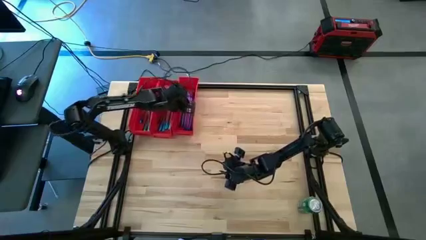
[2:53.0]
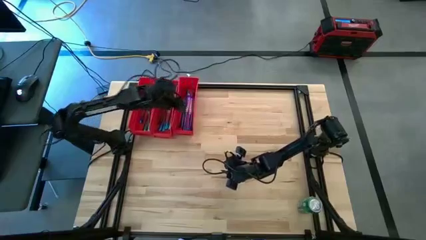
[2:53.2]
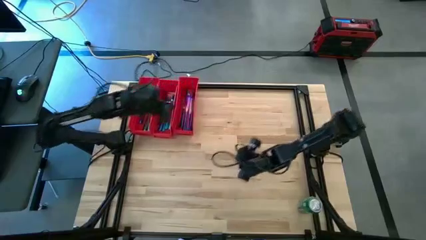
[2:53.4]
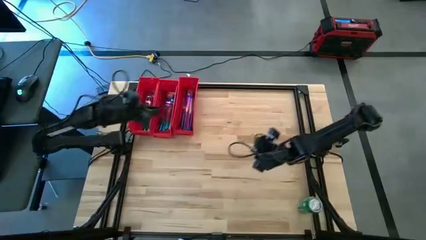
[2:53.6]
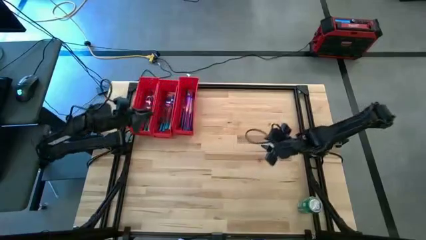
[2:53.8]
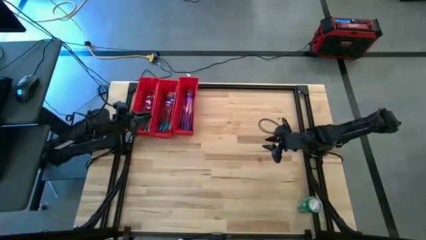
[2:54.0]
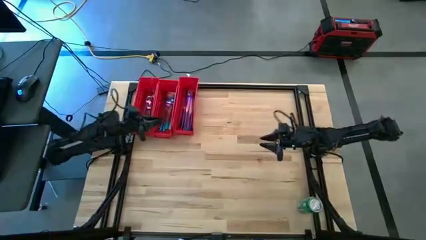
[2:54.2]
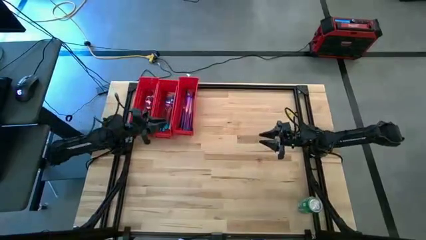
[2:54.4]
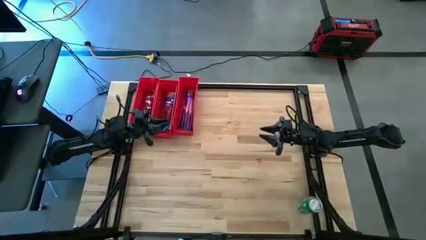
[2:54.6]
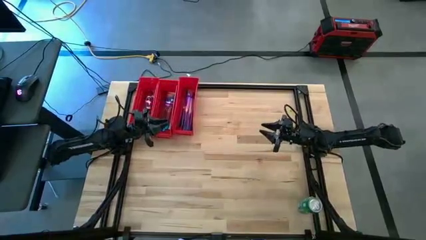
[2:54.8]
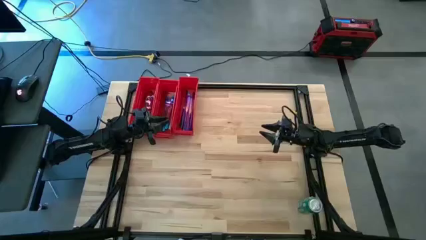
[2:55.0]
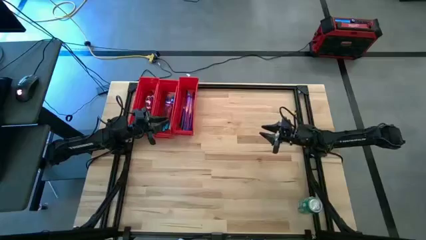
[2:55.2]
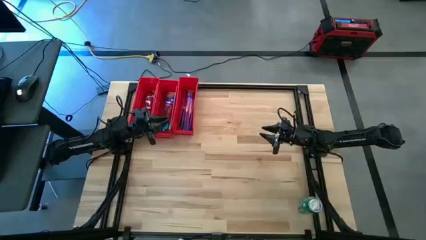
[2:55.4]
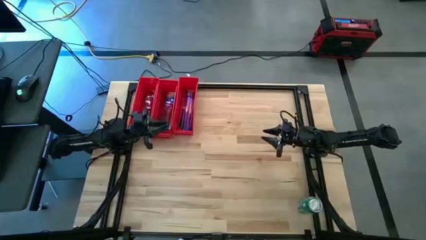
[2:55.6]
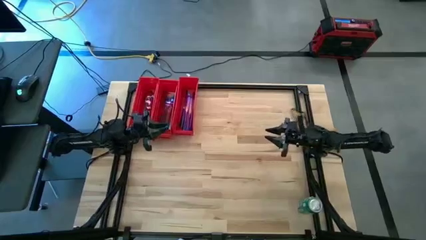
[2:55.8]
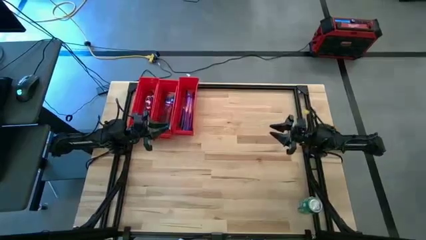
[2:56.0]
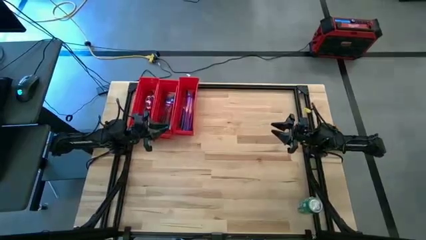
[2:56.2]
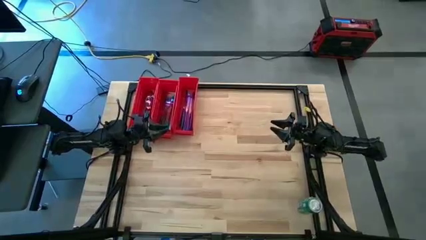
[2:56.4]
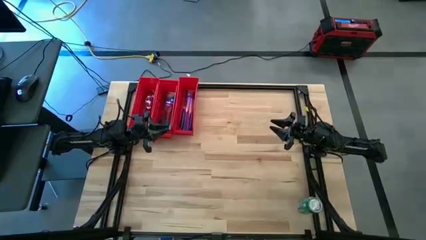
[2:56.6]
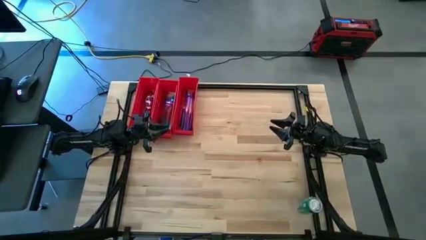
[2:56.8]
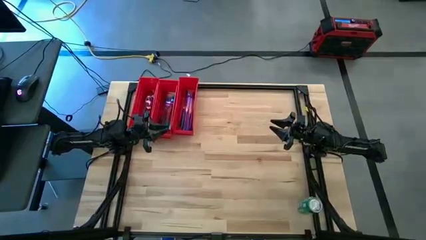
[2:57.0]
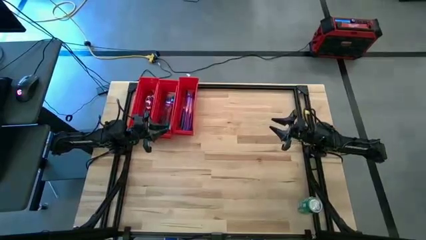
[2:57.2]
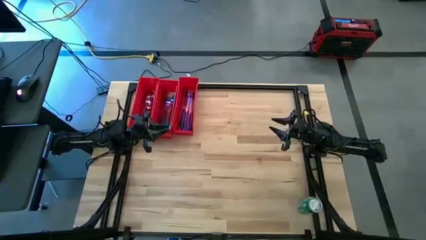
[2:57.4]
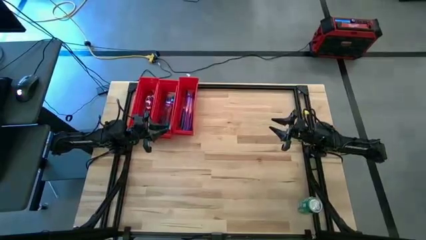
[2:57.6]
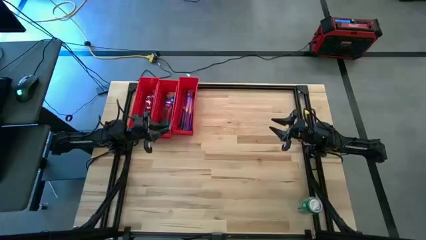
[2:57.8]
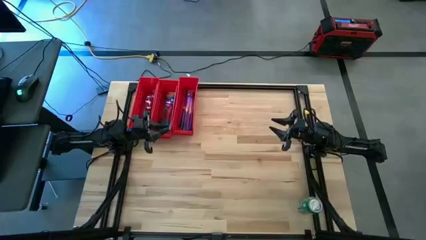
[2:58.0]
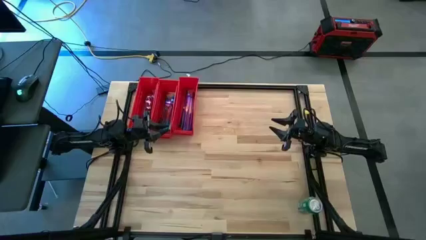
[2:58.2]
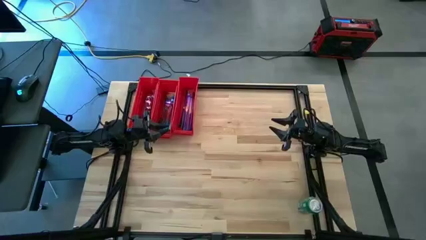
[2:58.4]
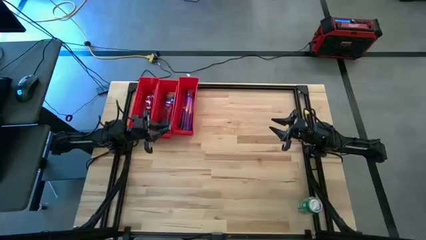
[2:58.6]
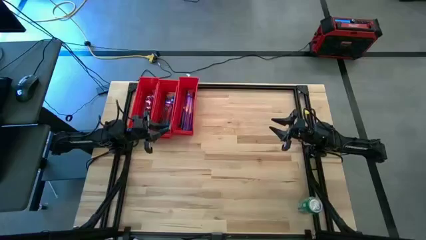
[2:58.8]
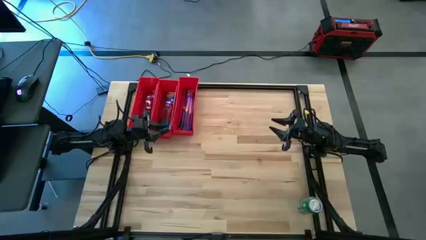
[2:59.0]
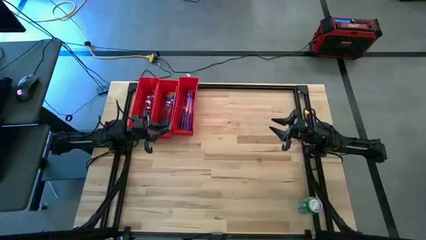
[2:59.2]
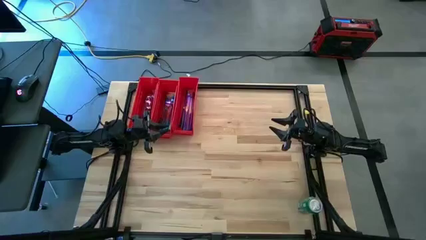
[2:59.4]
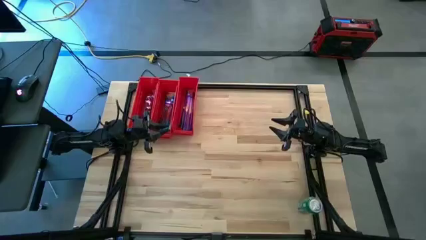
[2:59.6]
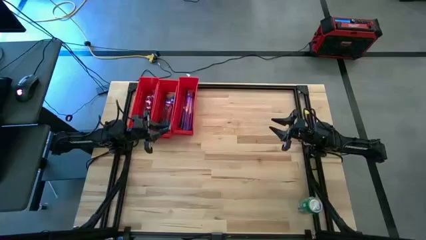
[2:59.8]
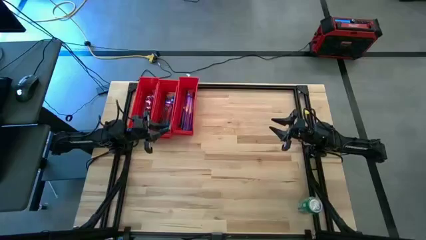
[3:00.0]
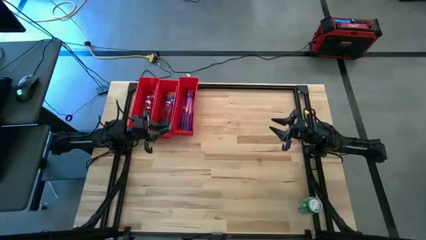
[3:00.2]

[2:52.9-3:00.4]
Task: Sort silverware
Return to home position

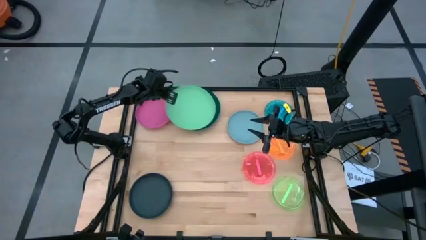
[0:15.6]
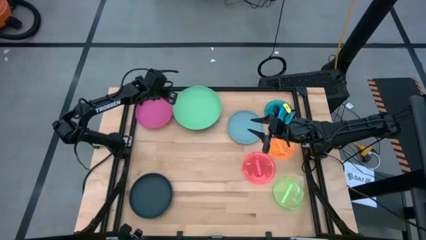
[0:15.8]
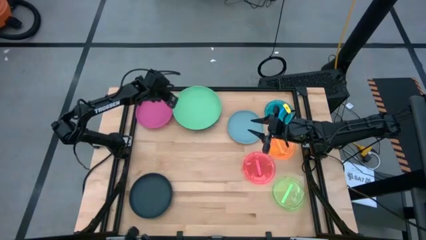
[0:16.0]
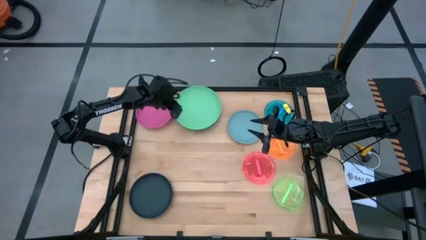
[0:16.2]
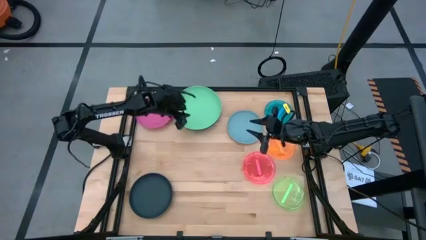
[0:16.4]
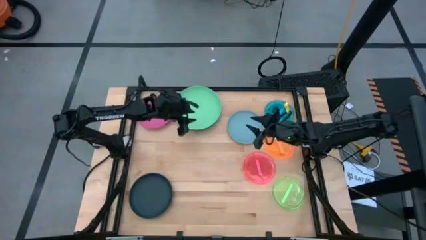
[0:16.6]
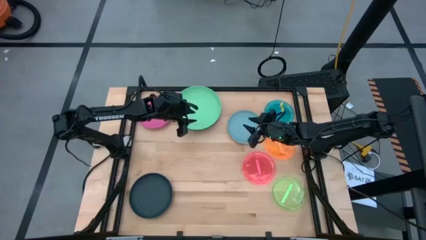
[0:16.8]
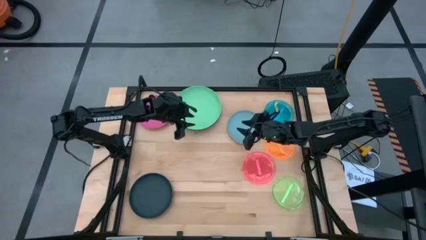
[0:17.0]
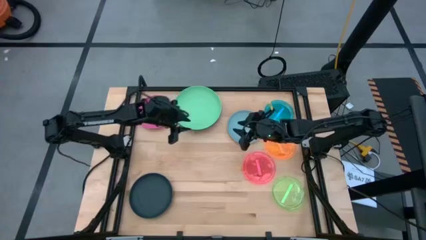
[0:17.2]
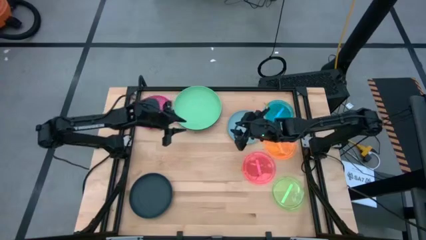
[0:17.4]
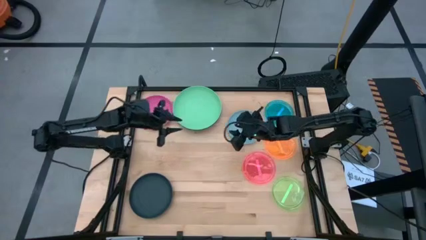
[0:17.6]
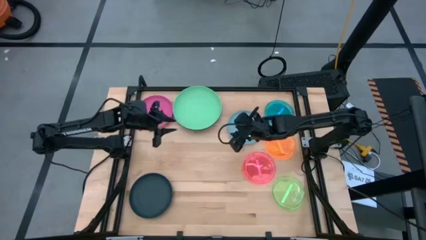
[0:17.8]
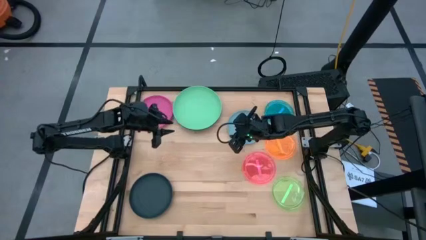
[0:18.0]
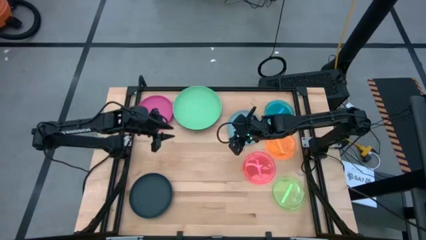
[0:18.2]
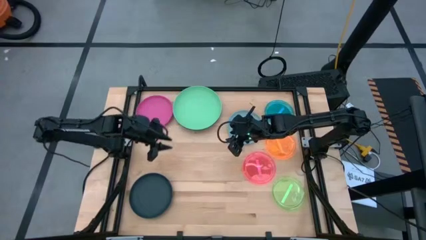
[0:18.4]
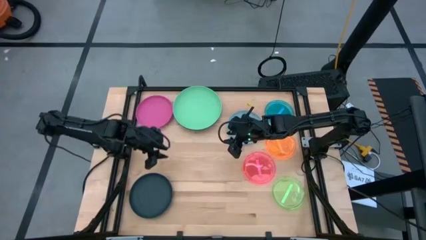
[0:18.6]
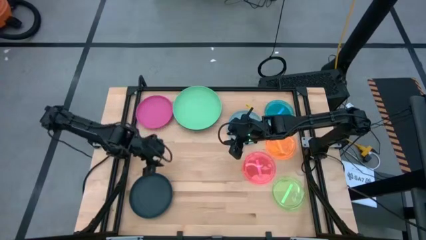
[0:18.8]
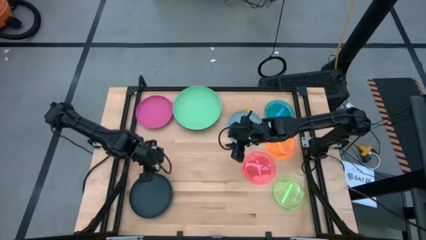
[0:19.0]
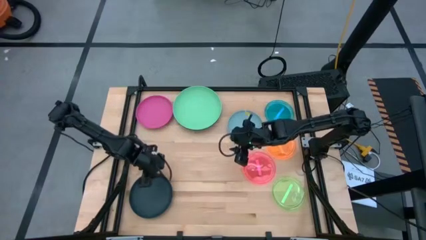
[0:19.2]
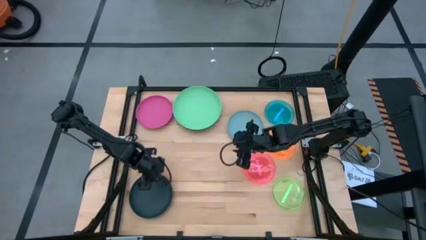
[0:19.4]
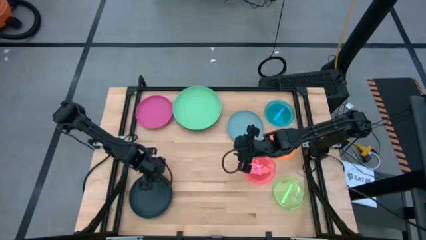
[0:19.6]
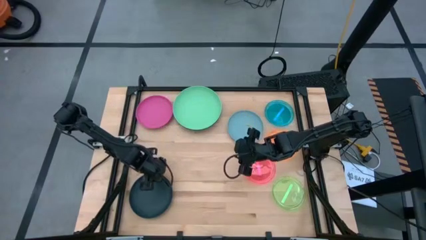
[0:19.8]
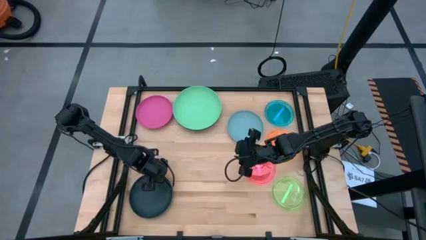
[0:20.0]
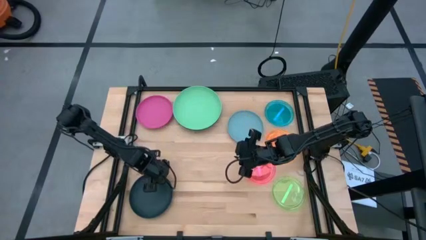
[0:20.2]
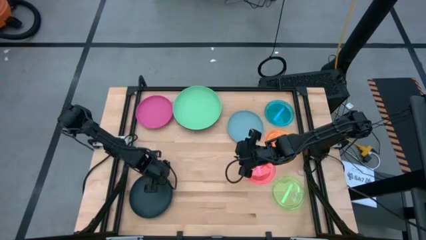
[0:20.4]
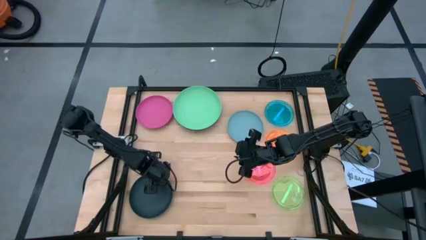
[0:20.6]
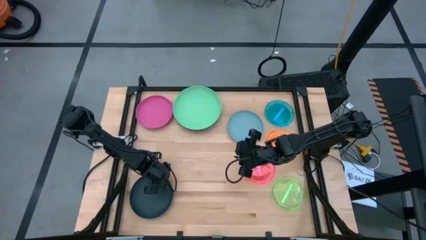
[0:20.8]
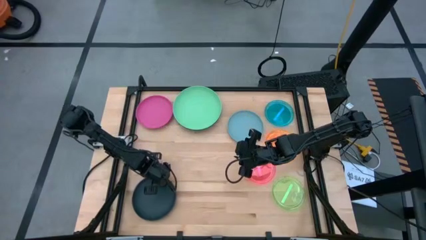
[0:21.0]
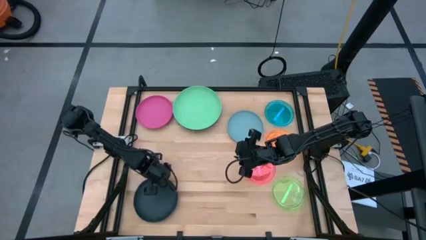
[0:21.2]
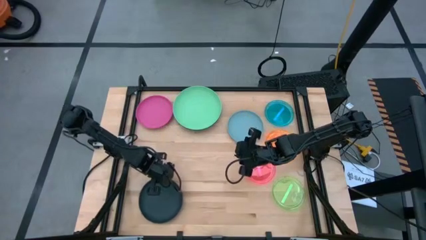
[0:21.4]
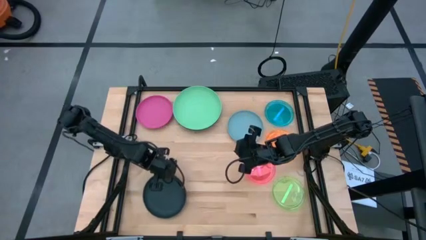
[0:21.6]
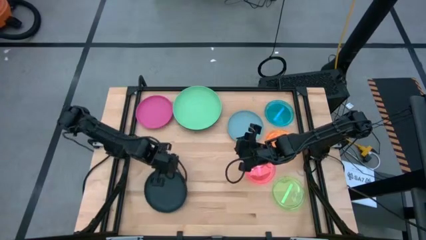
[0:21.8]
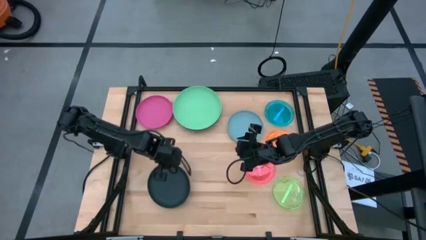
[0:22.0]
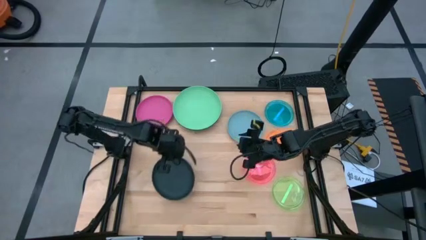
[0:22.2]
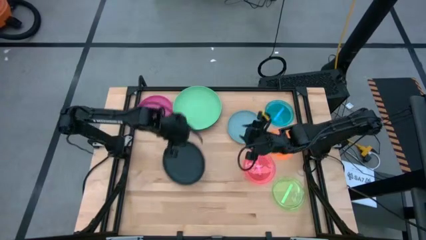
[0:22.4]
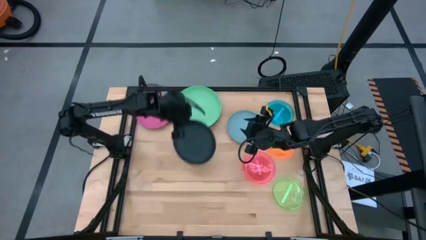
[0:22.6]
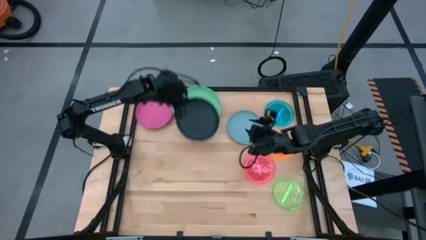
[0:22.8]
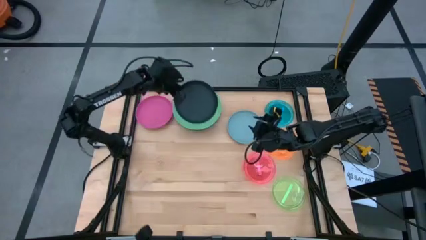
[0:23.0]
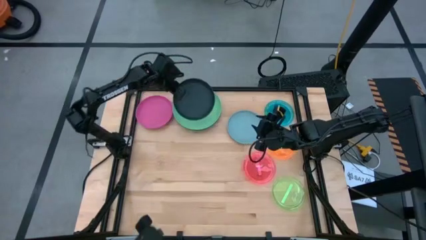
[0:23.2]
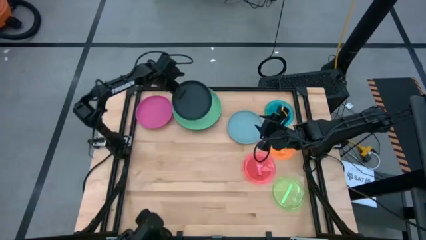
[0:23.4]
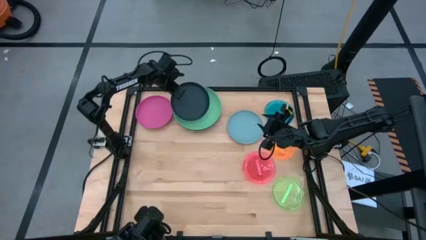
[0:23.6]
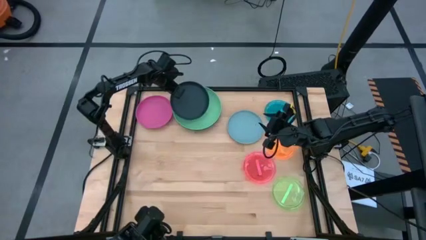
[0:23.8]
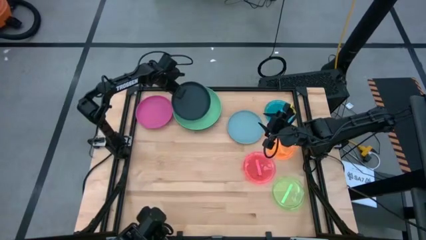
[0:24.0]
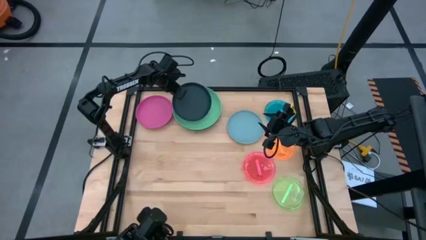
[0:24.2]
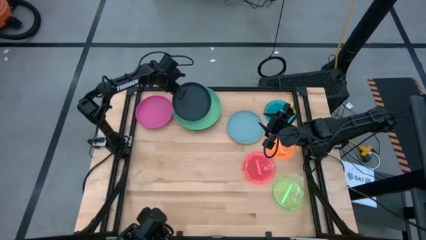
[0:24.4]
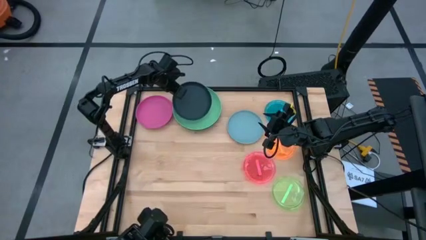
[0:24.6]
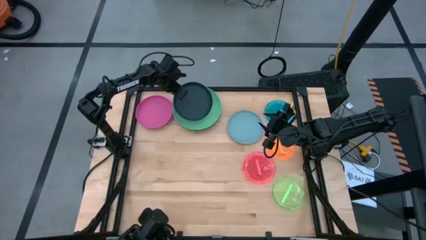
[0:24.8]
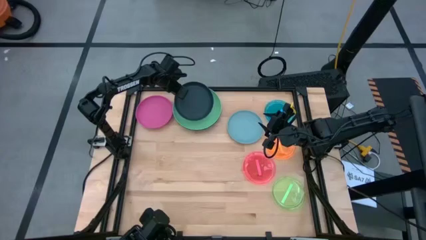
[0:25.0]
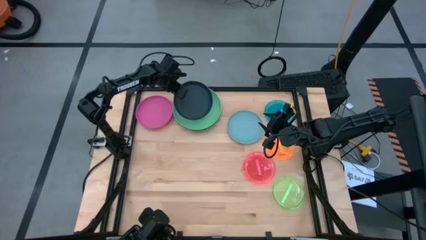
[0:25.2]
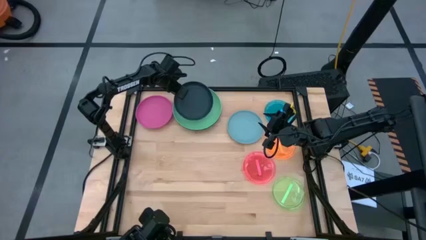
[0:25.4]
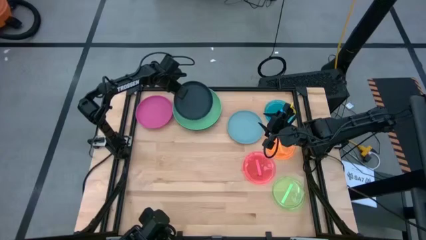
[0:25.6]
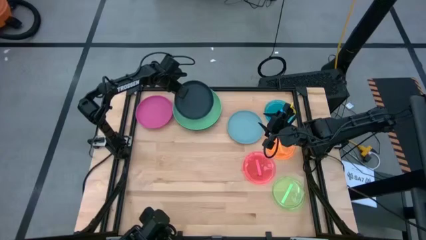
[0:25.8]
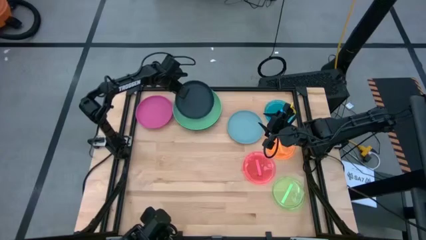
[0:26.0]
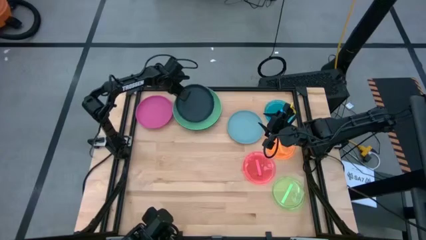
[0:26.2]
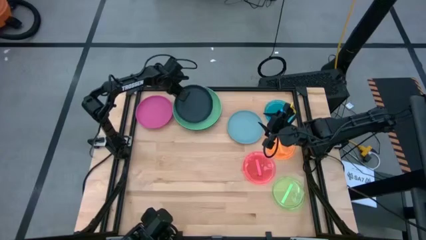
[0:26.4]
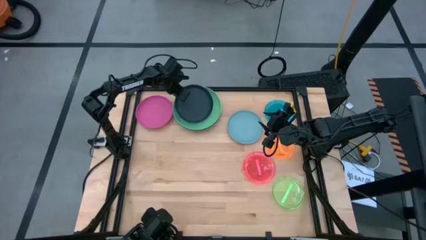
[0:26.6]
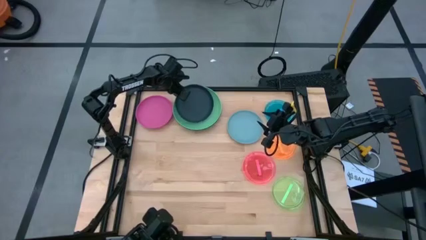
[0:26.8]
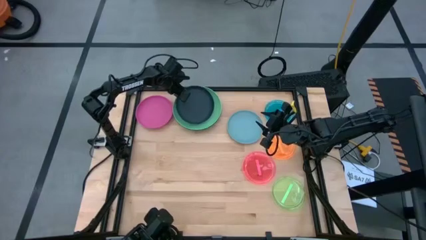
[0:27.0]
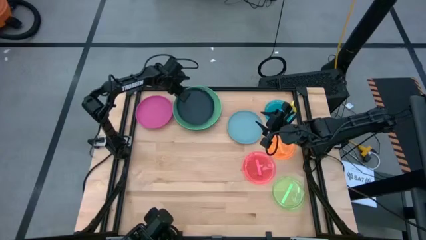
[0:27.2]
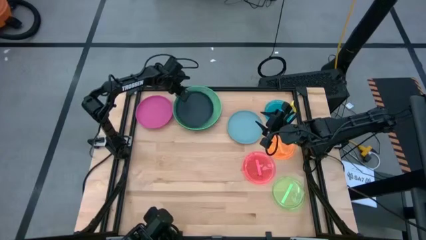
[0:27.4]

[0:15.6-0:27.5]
Task: Stack plastic plates
Stack the black plate on the light green plate
